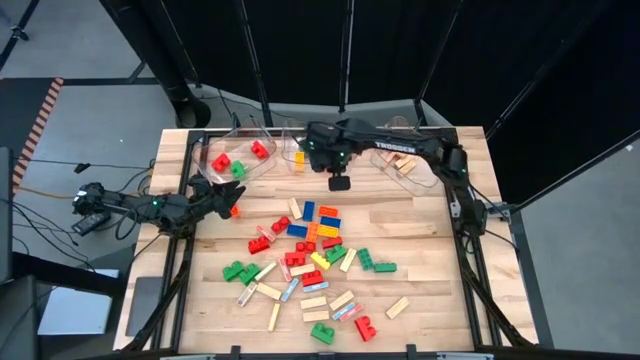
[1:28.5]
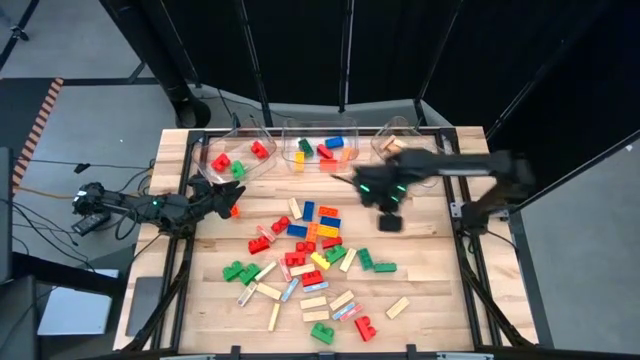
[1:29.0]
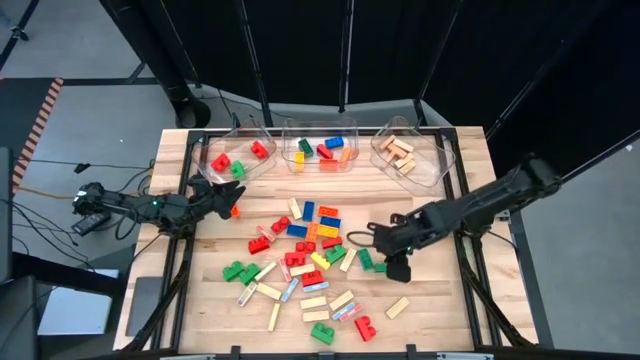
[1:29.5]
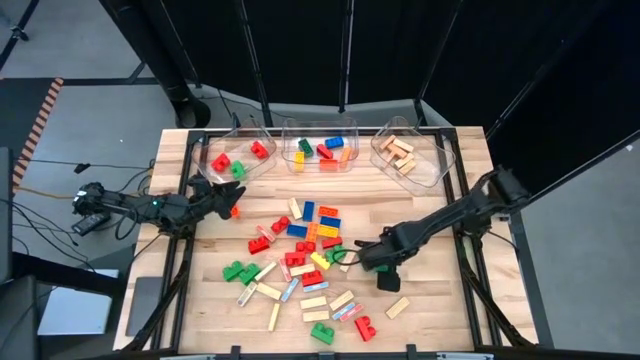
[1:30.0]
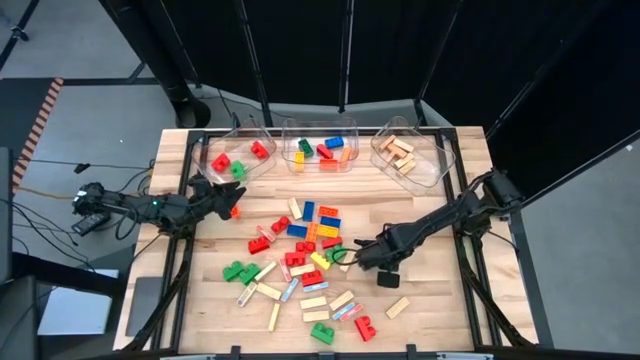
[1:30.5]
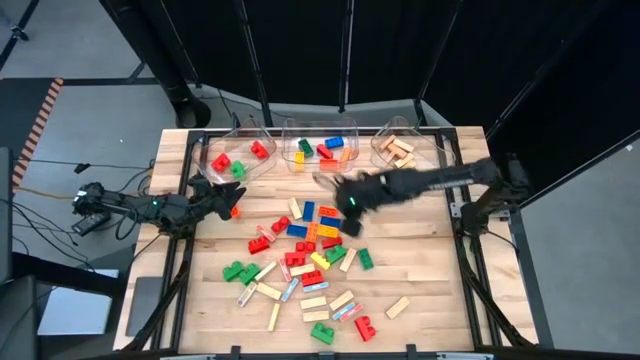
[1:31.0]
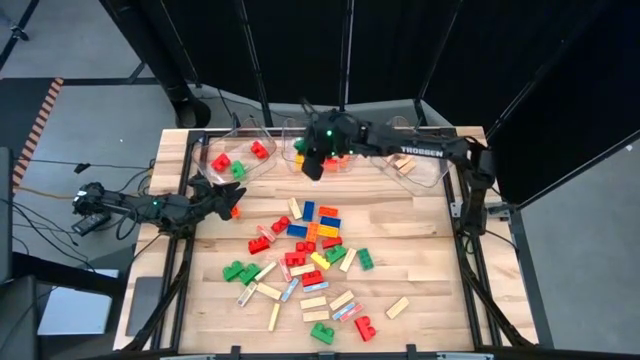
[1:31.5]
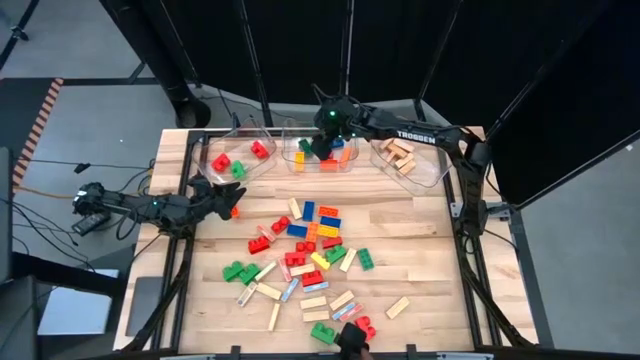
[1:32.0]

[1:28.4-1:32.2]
Task: Sort blocks by size
Put the large green game piece into the middle transparent bin

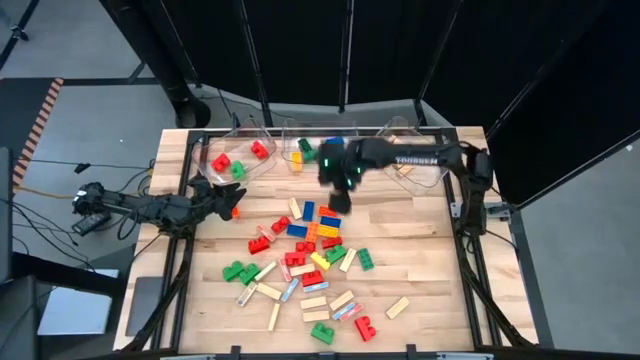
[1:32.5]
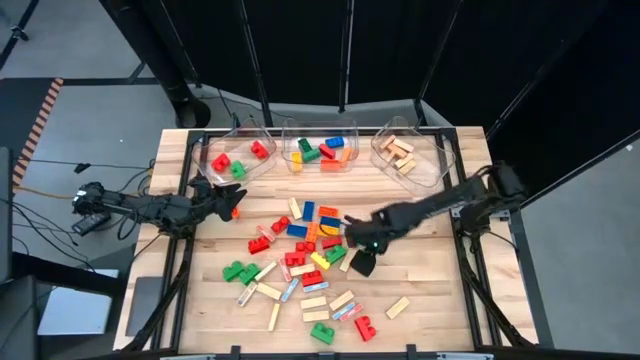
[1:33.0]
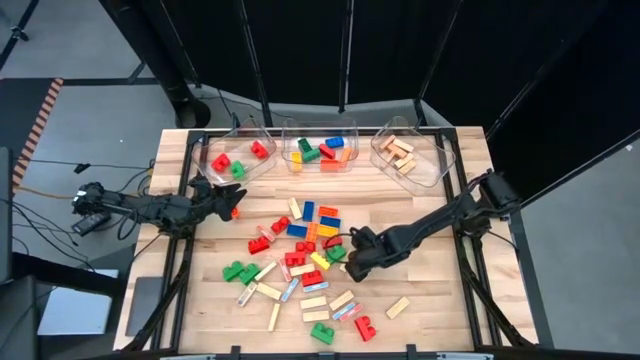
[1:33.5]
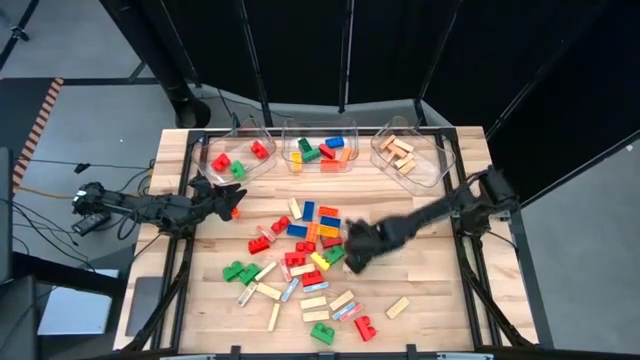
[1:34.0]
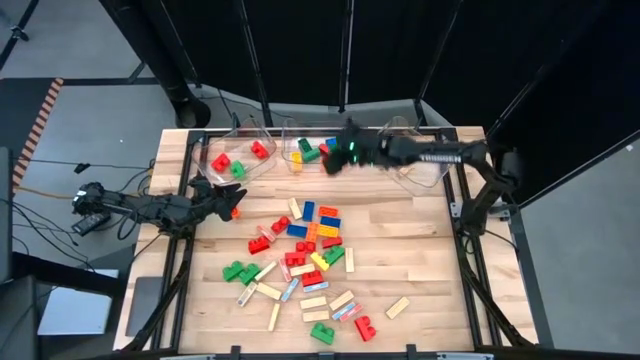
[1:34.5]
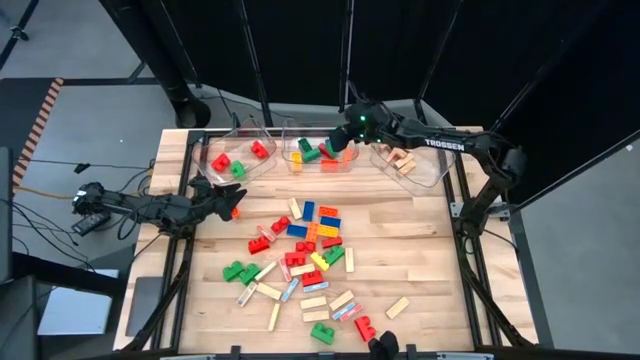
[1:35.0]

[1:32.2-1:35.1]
Put the large green game piece into the middle transparent bin

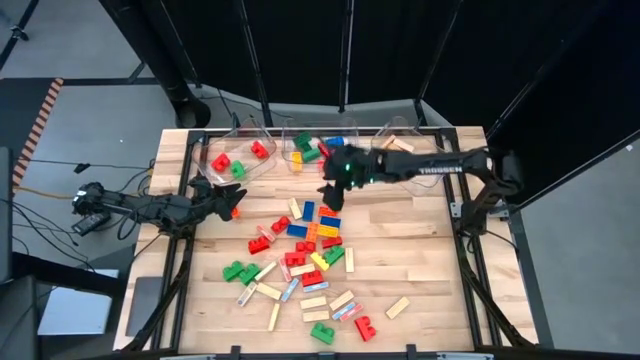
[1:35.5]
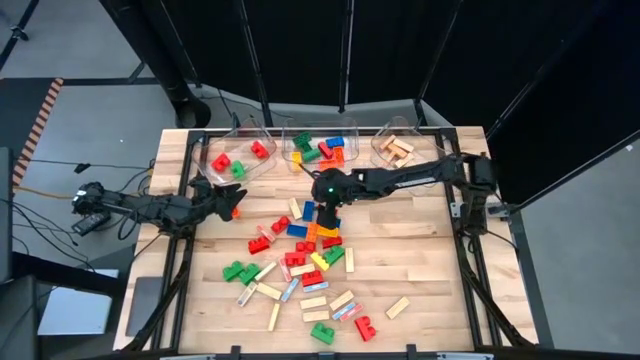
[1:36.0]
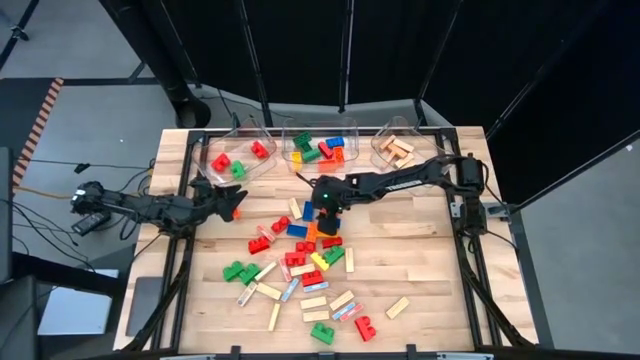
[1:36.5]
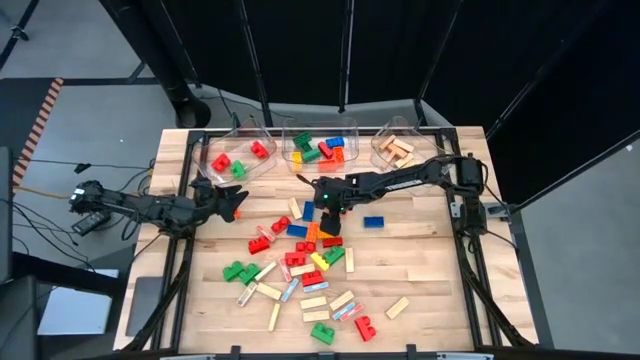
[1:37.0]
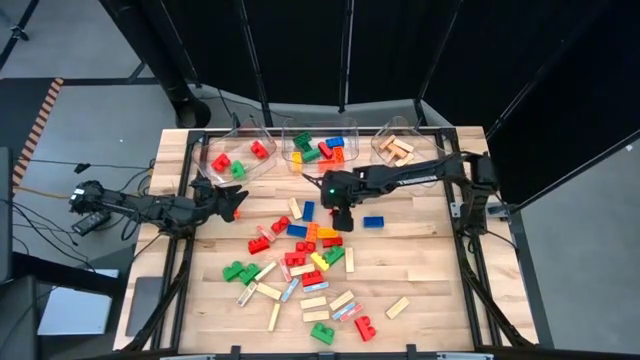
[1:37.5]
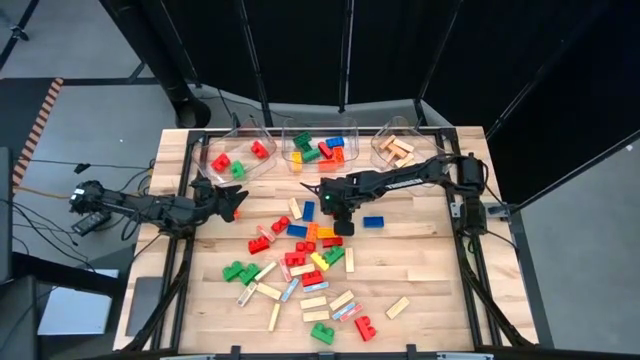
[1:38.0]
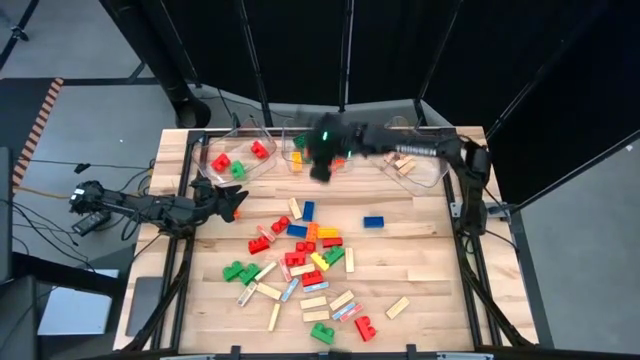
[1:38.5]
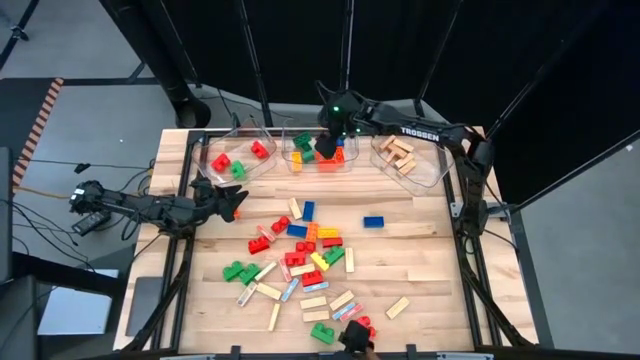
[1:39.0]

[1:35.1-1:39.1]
Put the large orange game piece into the middle transparent bin

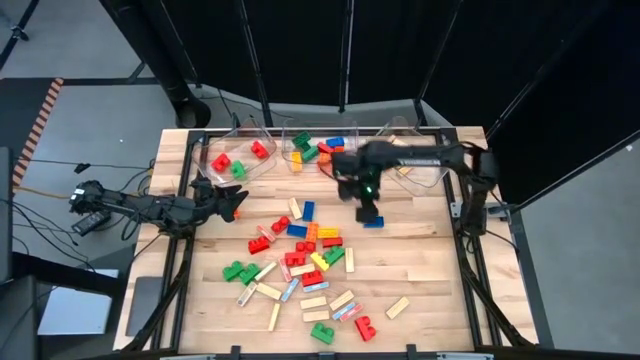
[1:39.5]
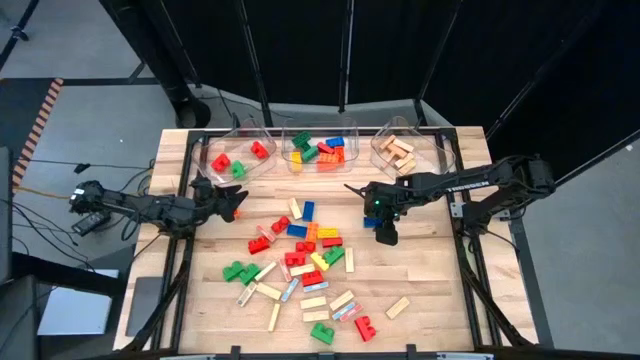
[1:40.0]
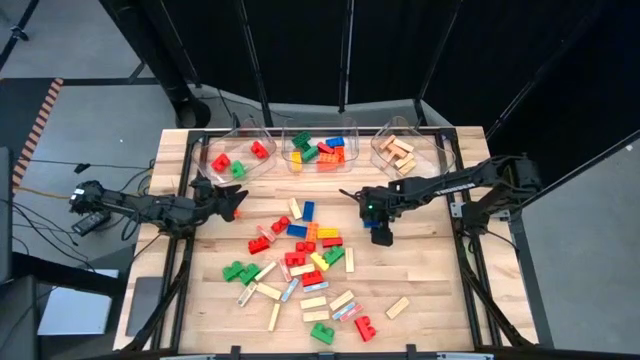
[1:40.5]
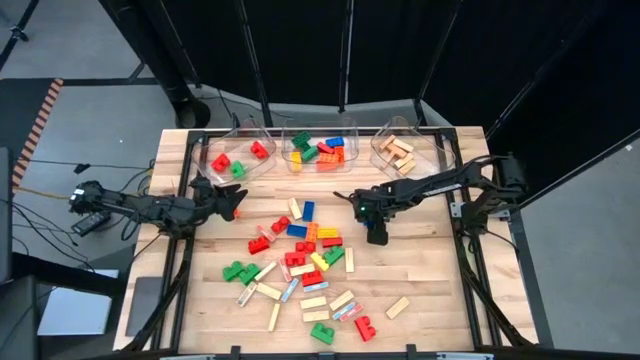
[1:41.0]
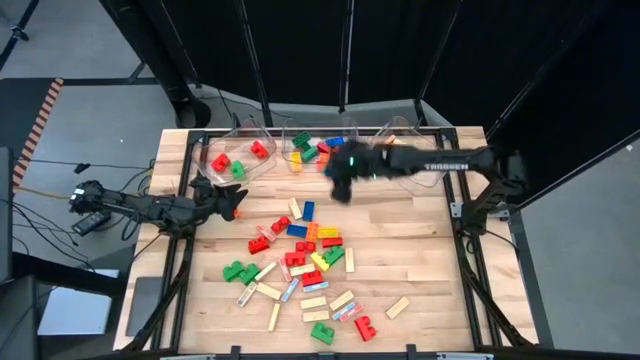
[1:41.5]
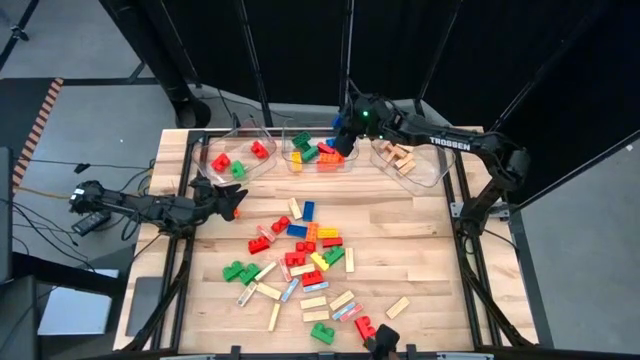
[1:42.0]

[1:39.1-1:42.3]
Put the large blue game piece into the middle transparent bin

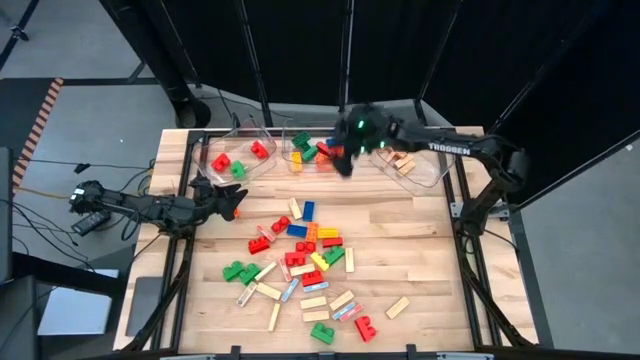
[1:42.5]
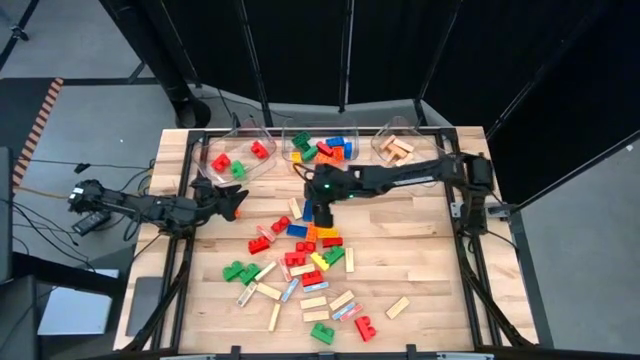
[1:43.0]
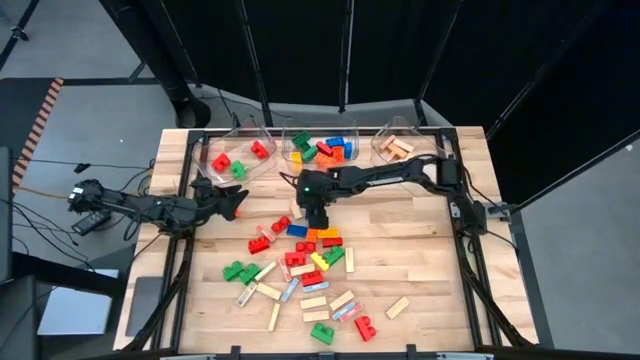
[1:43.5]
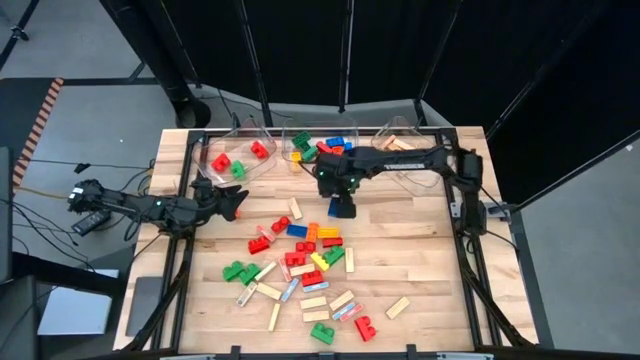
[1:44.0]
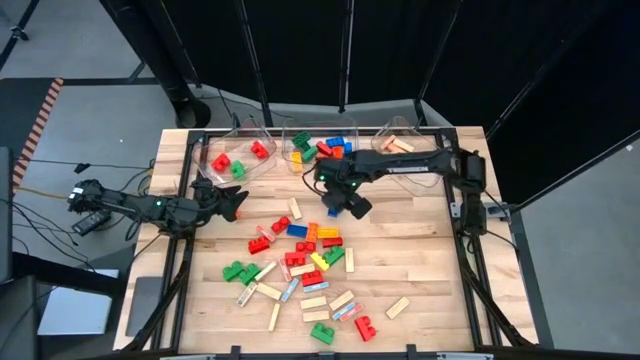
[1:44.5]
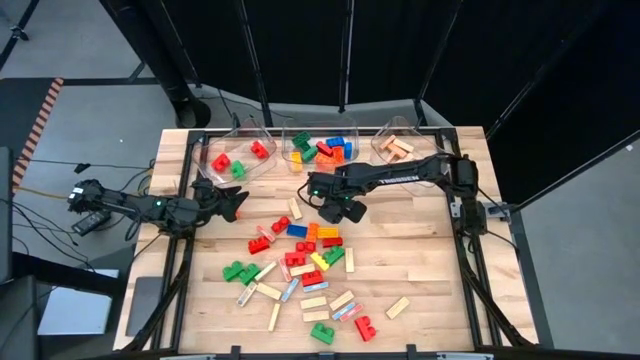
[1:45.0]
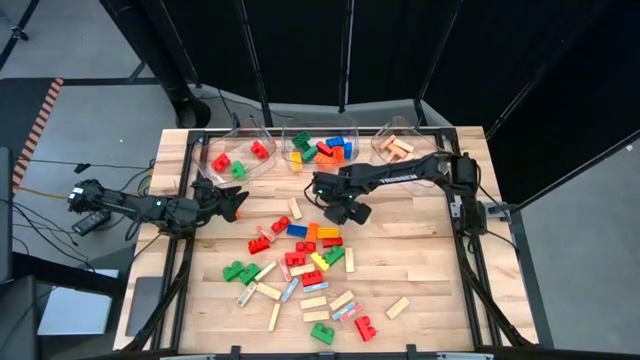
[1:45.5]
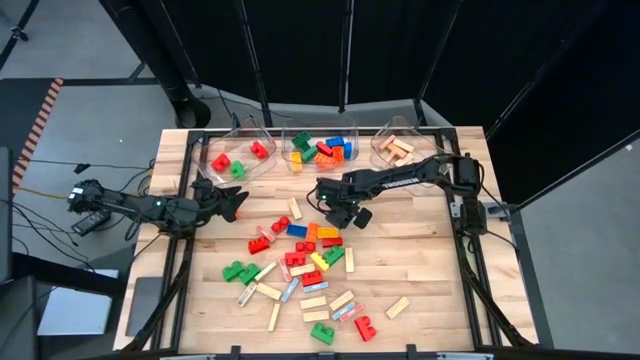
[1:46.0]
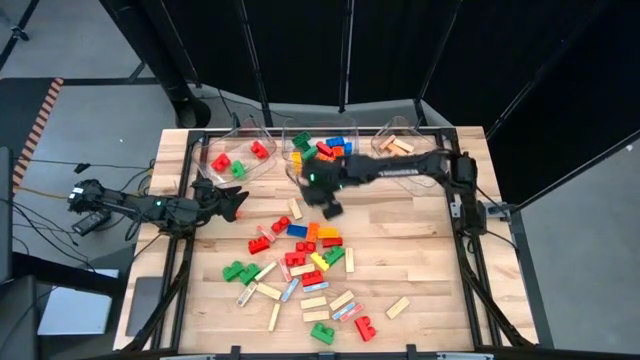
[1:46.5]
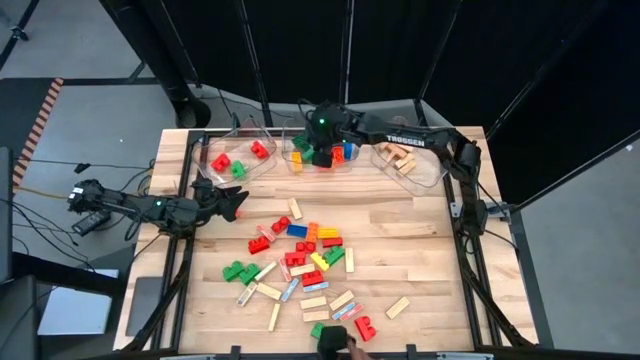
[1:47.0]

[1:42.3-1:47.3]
Put the large blue game piece into the middle transparent bin

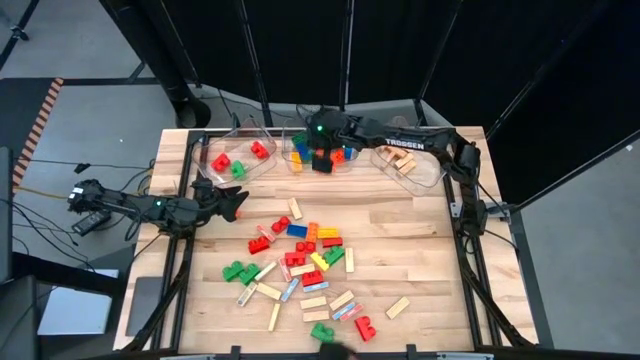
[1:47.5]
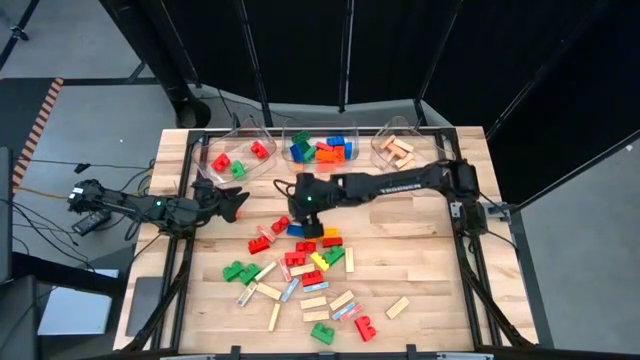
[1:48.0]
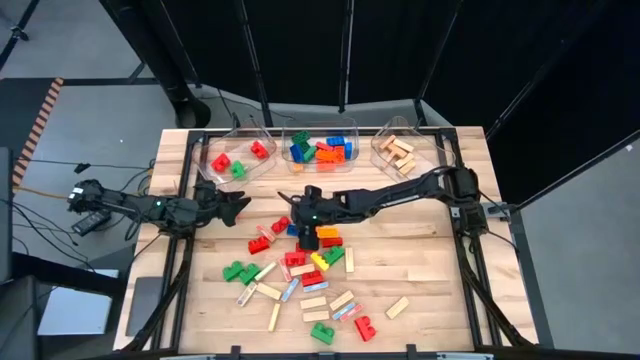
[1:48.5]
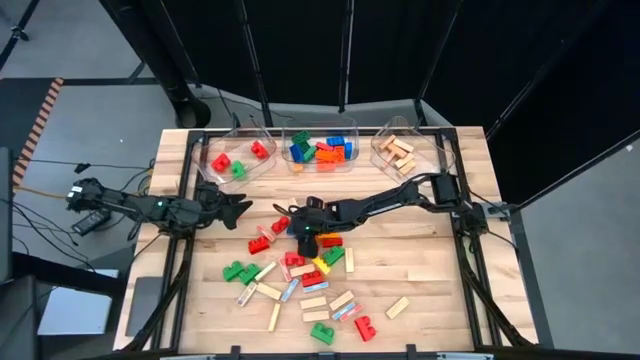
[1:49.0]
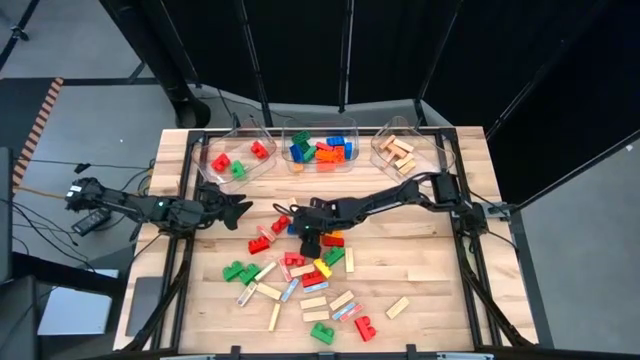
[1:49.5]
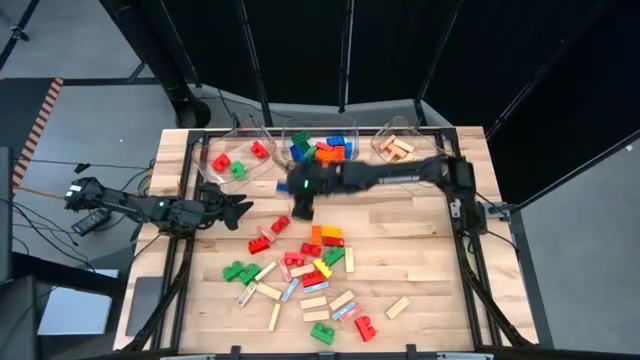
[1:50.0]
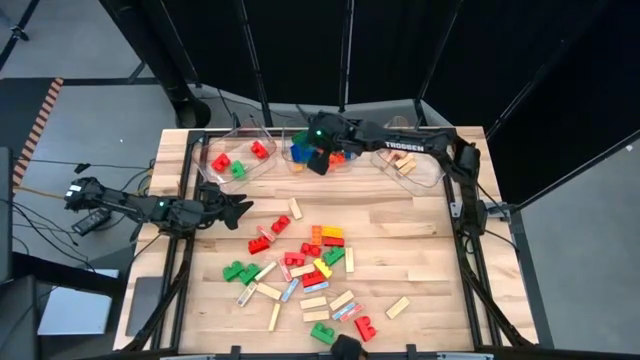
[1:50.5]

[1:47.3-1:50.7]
Put the large blue game piece into the middle transparent bin
